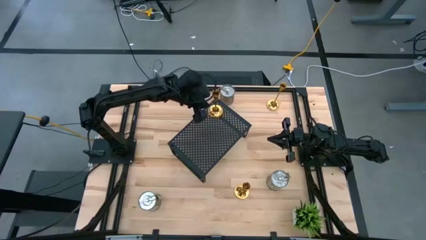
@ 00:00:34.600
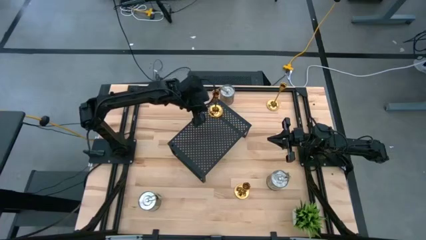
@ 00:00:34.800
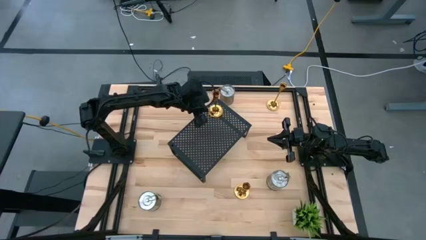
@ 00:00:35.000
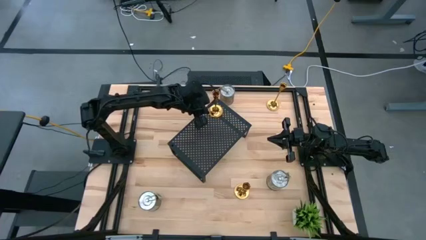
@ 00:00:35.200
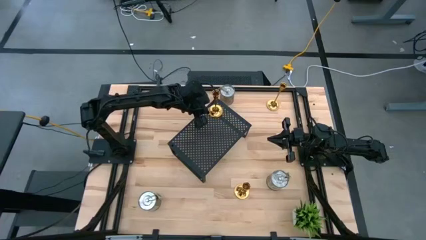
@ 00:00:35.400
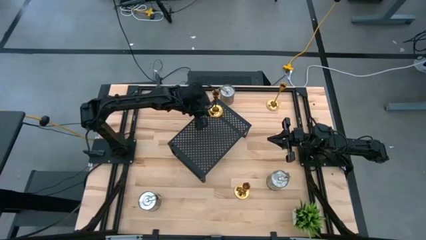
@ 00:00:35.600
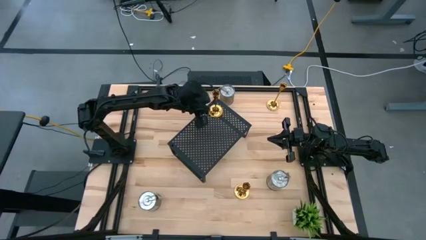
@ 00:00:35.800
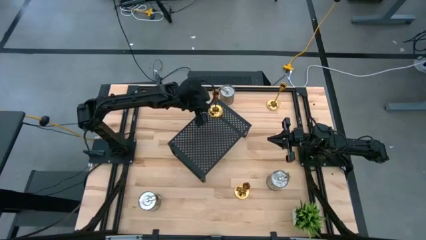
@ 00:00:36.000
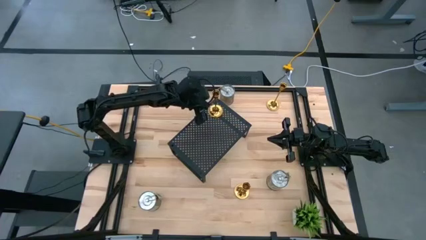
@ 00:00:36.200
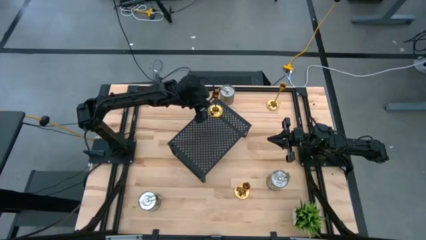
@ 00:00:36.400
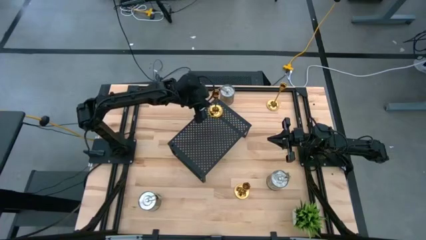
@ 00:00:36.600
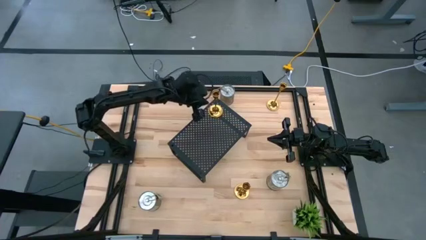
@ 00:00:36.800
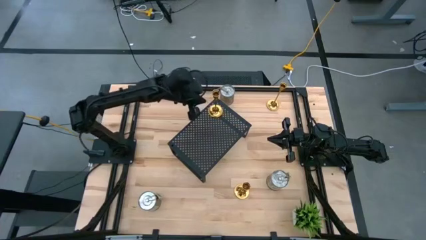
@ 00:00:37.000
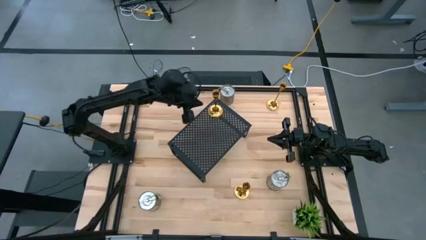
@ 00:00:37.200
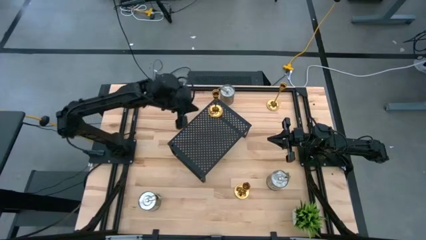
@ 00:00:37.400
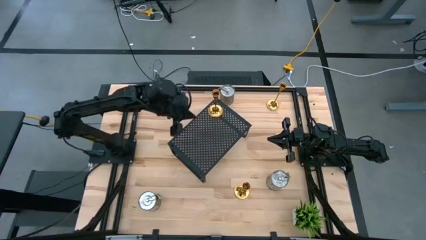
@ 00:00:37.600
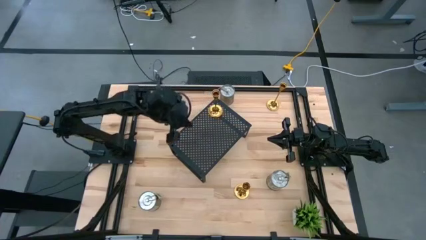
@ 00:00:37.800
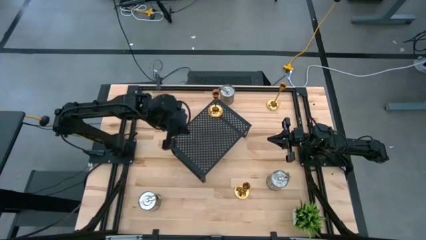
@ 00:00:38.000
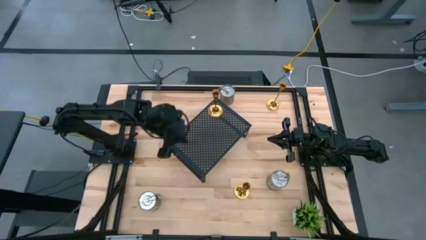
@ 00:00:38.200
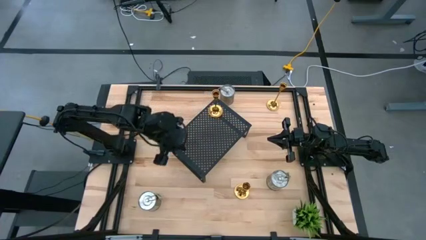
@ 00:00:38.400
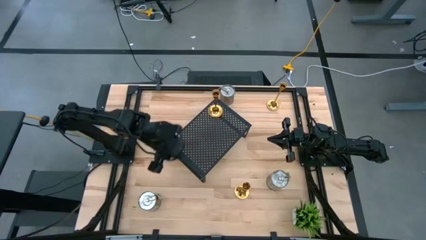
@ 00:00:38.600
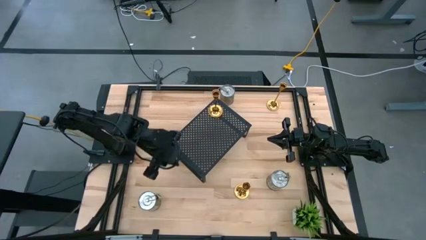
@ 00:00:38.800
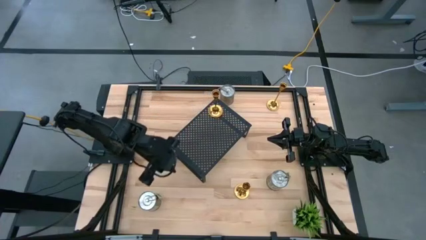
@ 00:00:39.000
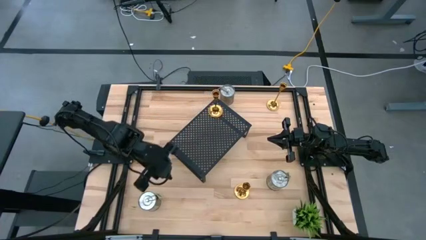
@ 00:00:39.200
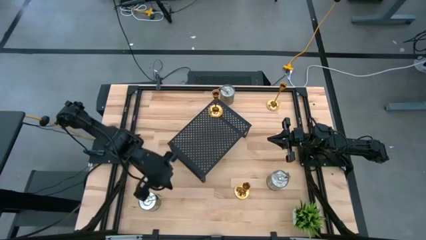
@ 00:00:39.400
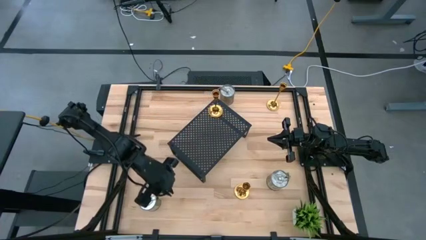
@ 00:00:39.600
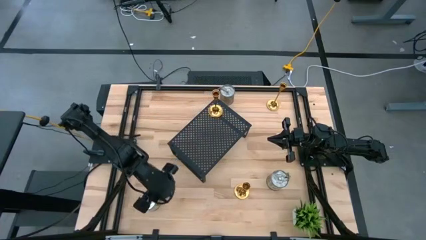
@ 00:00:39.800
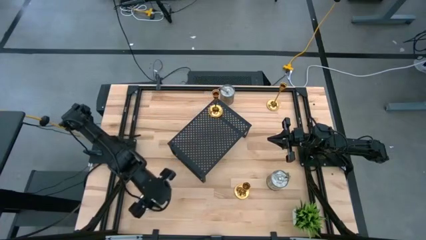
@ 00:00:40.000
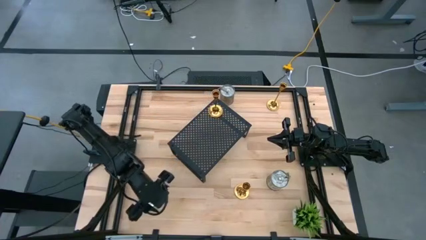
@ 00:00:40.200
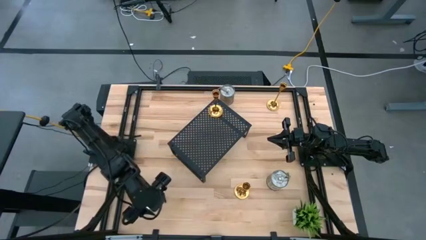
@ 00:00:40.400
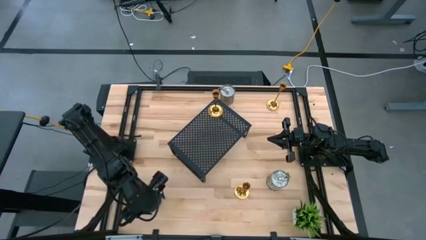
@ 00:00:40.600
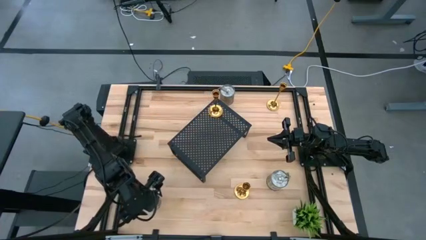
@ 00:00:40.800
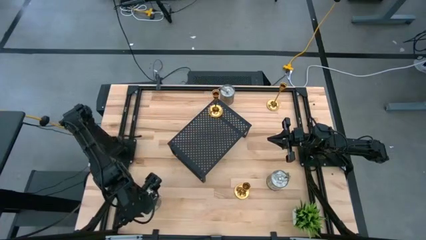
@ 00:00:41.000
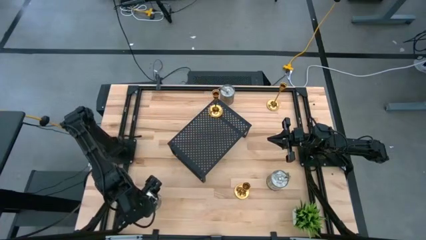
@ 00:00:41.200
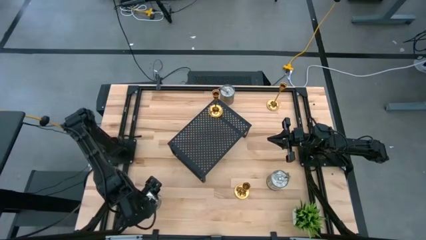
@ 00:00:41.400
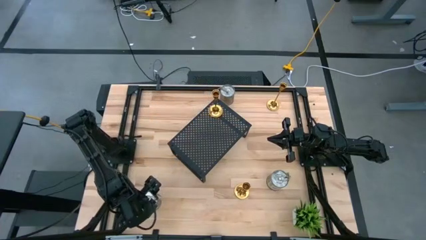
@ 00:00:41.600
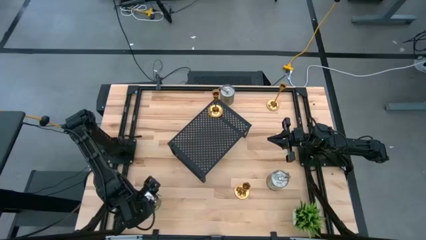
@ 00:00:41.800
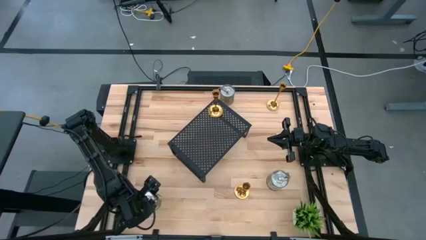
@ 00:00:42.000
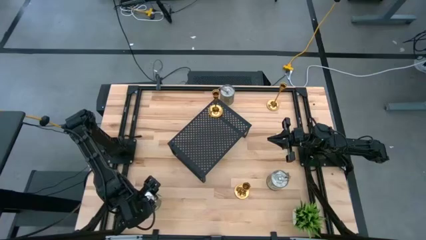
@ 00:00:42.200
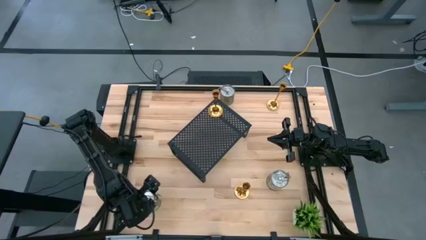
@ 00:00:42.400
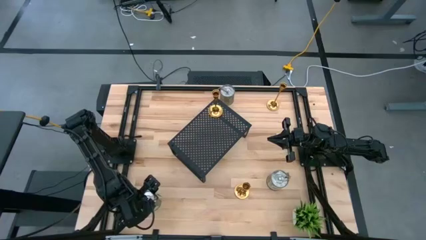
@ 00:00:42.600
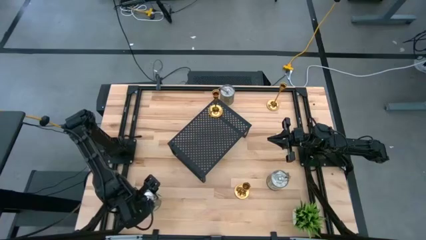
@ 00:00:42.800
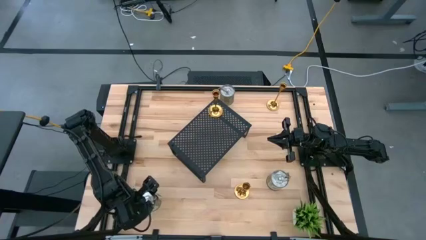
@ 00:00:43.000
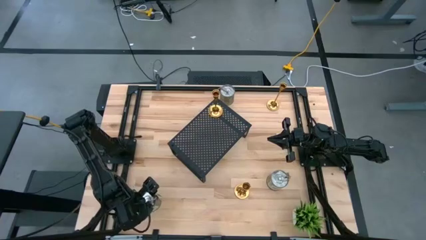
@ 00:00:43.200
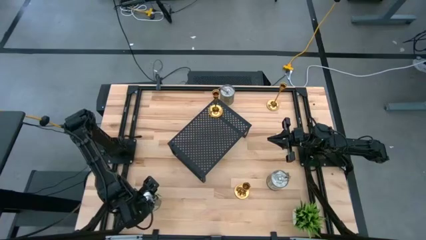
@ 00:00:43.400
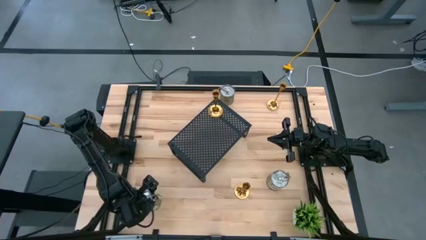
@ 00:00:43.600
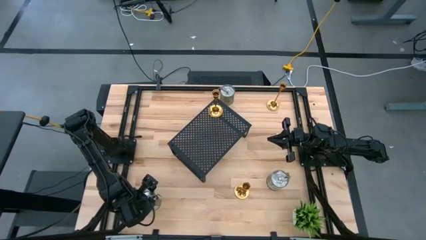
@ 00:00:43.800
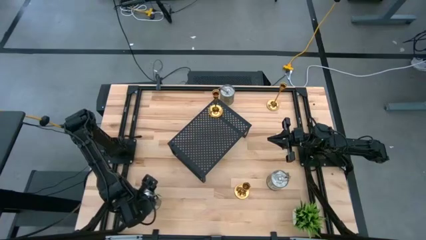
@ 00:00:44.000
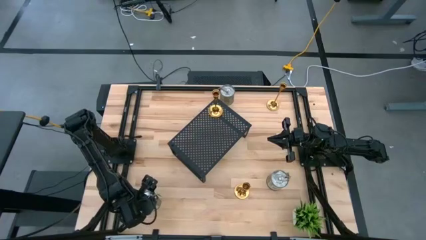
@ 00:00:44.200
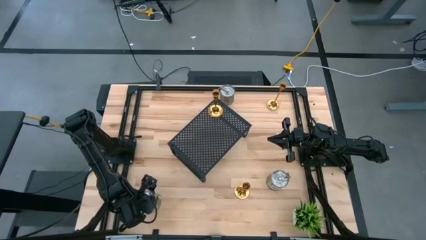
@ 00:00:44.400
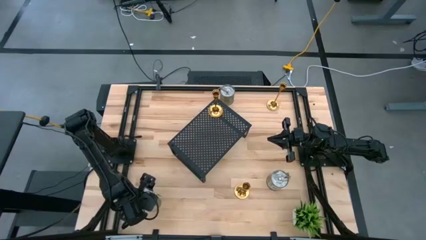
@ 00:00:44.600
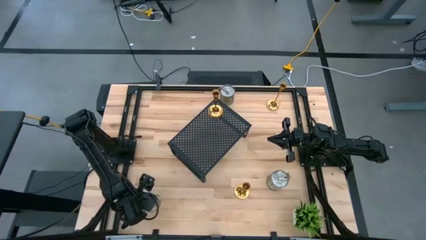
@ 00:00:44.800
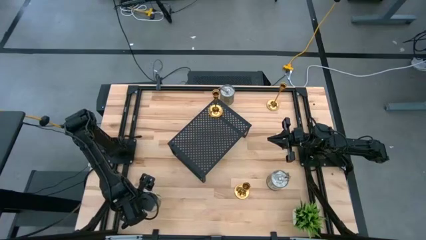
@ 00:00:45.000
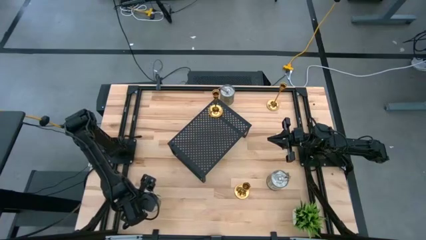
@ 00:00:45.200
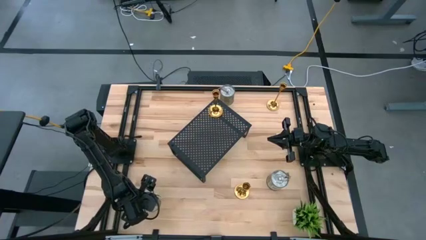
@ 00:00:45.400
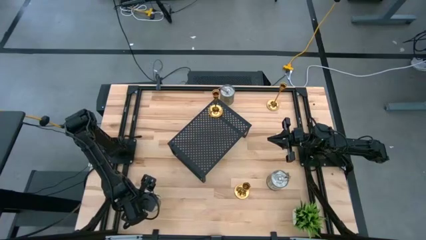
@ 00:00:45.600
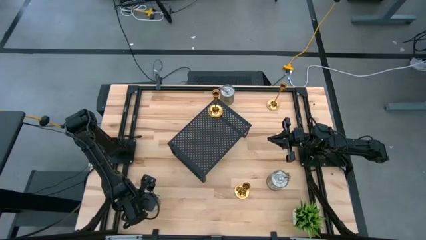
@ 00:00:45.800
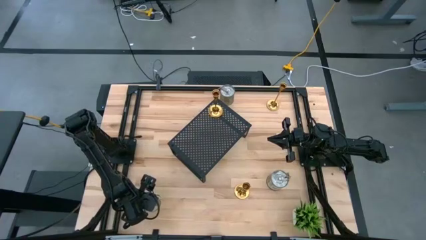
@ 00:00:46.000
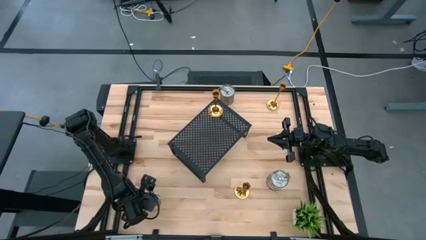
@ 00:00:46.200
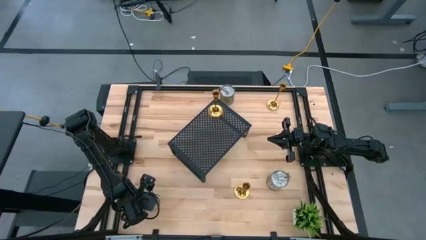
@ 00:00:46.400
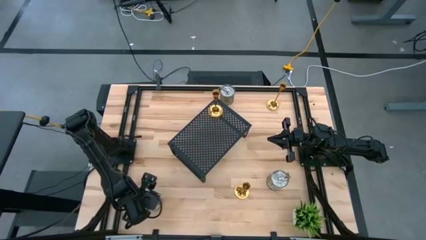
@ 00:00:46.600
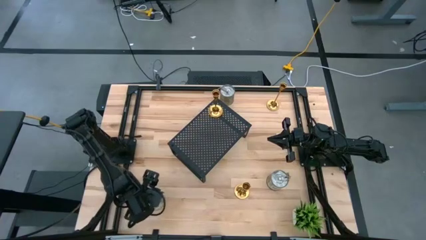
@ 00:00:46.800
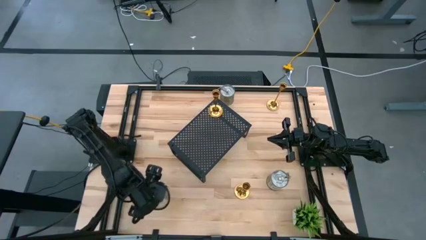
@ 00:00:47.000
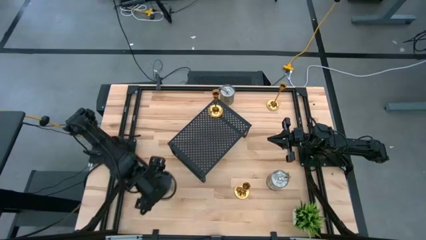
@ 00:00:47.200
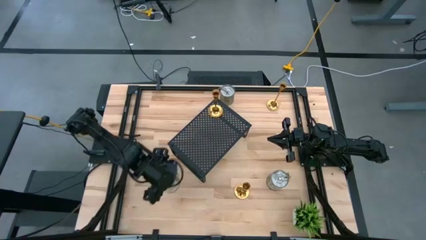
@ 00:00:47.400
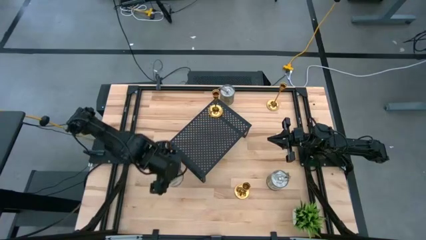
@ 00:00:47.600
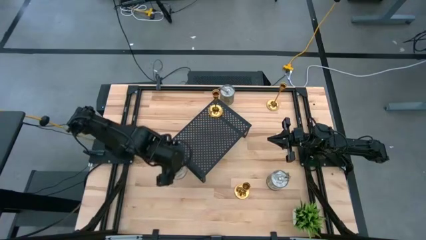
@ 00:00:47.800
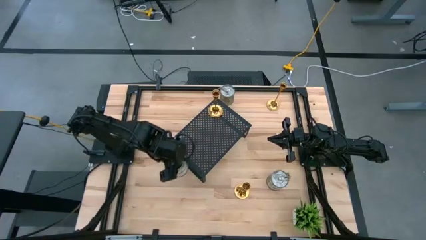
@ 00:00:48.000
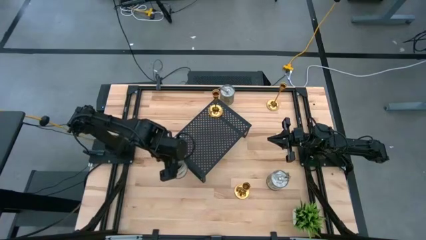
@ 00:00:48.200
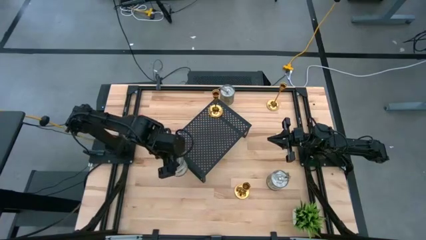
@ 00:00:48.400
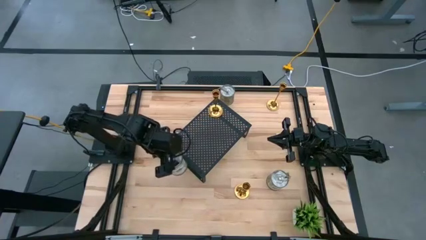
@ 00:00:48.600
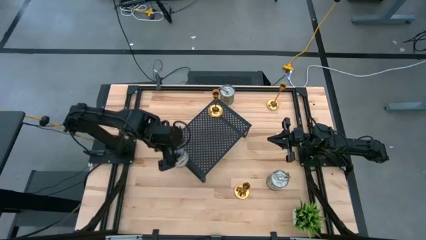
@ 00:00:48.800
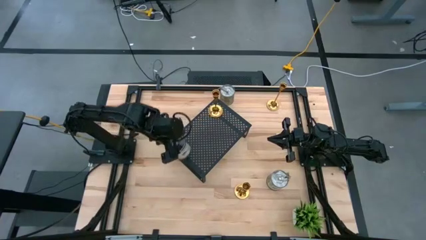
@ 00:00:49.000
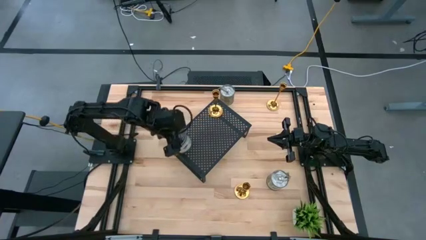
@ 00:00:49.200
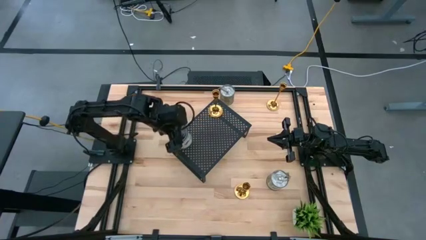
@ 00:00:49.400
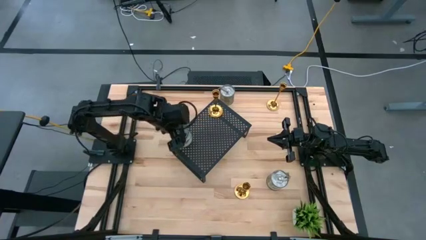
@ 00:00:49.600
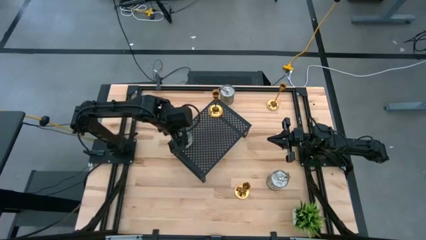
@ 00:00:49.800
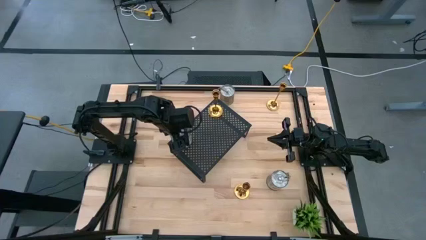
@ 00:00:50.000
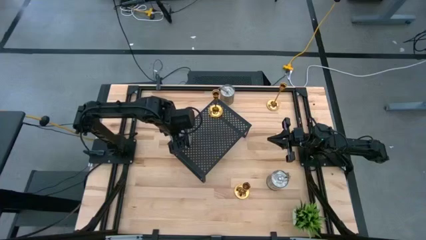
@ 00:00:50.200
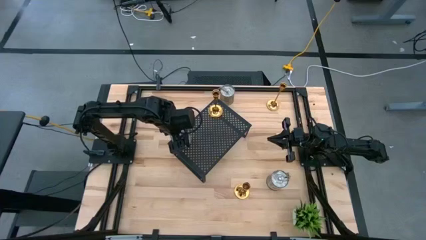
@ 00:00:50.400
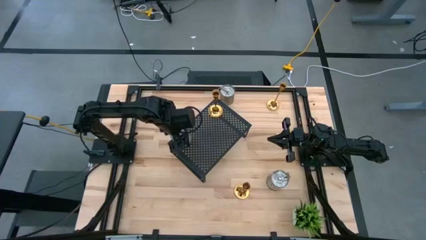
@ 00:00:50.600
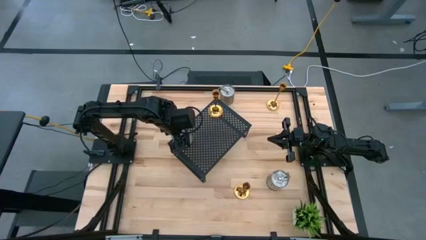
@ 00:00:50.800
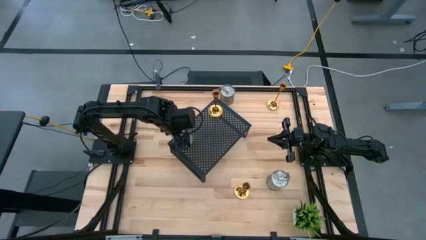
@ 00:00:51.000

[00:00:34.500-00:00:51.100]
Task: Pick & Place candle stick holders
Put the bottom left silver scented candle on the shelf
